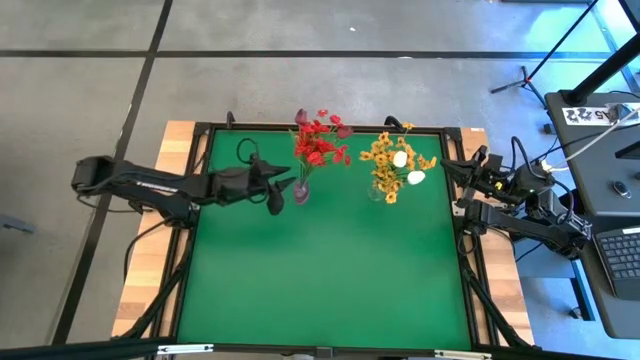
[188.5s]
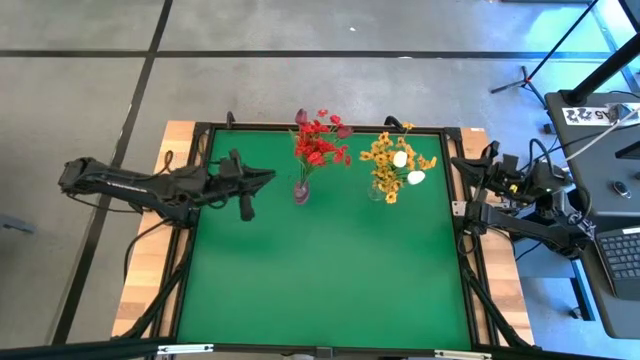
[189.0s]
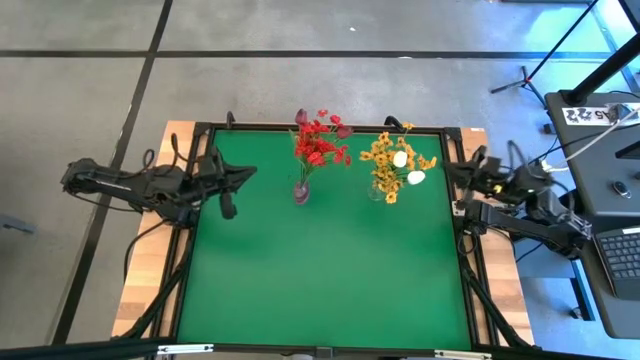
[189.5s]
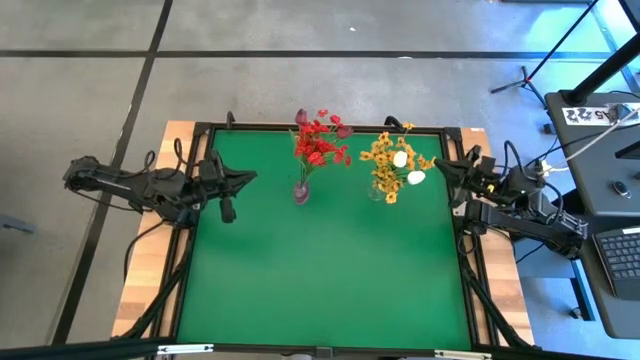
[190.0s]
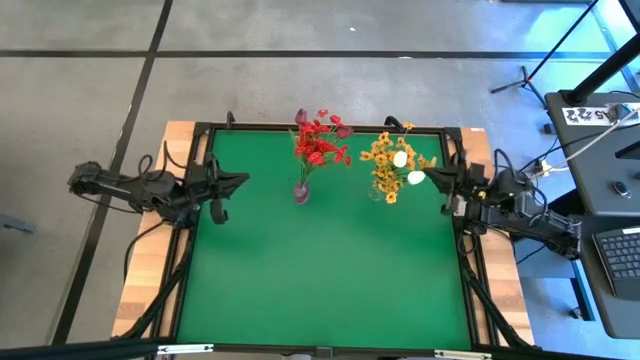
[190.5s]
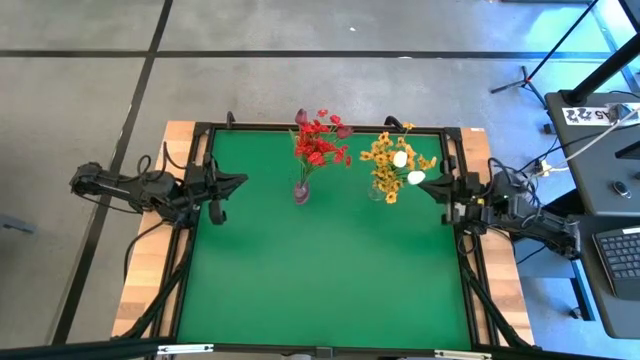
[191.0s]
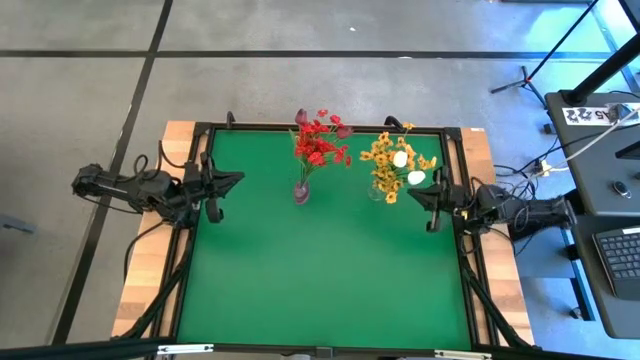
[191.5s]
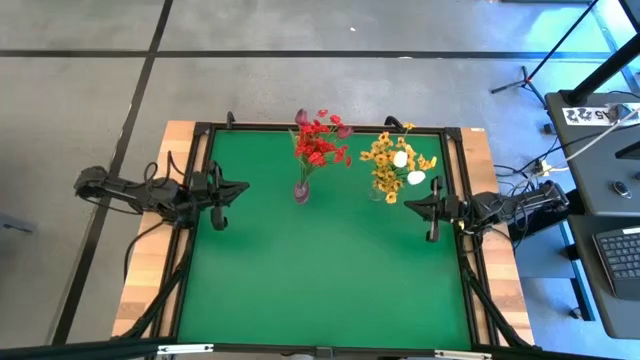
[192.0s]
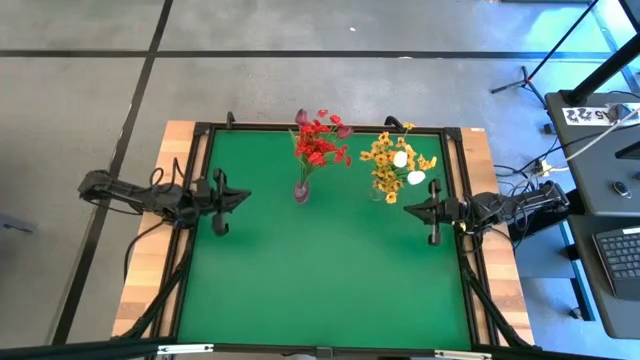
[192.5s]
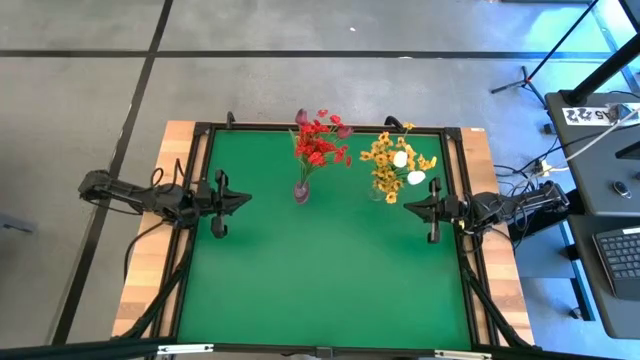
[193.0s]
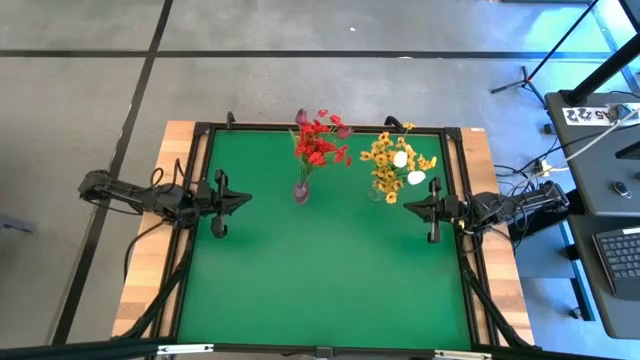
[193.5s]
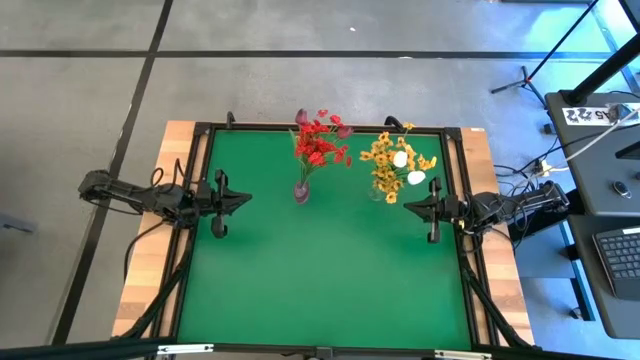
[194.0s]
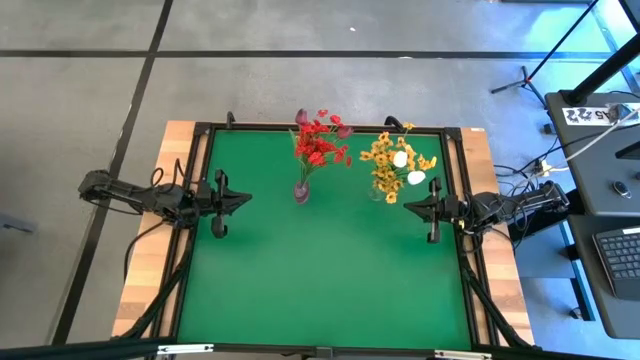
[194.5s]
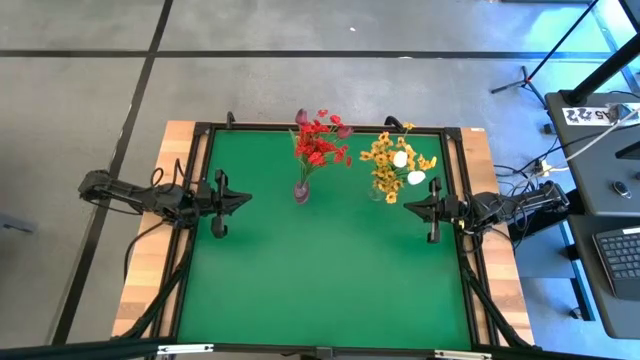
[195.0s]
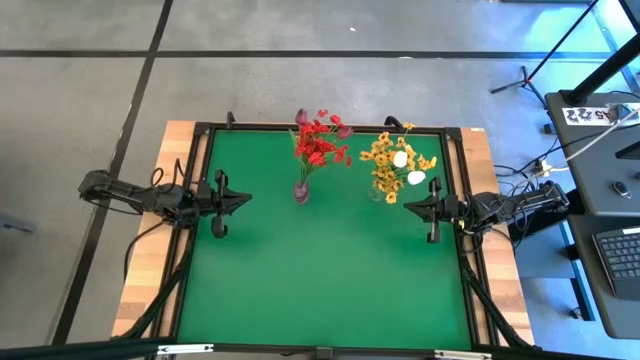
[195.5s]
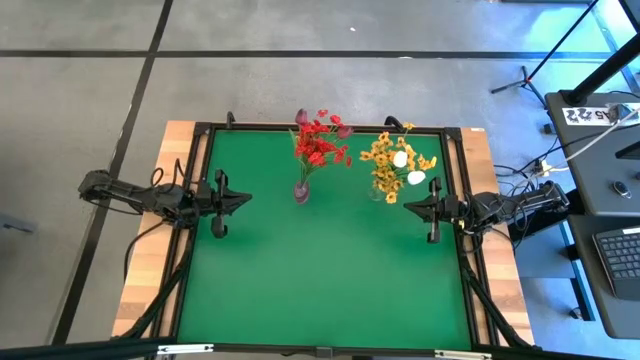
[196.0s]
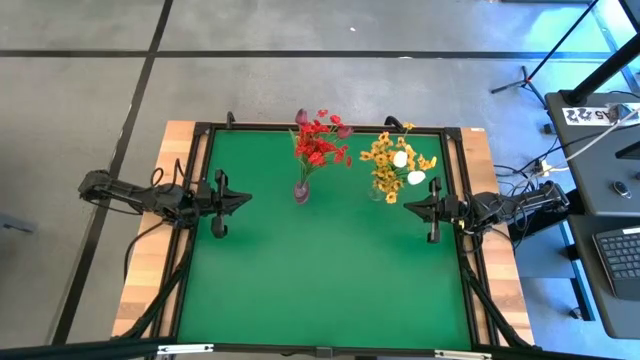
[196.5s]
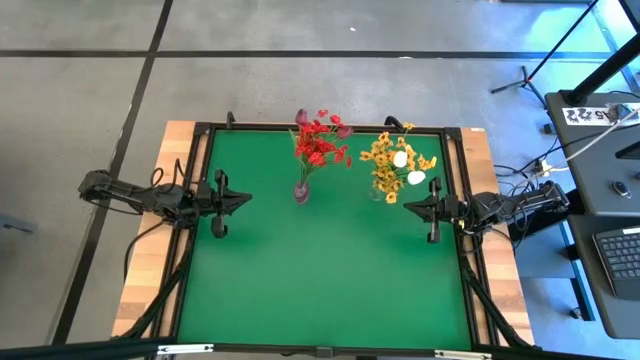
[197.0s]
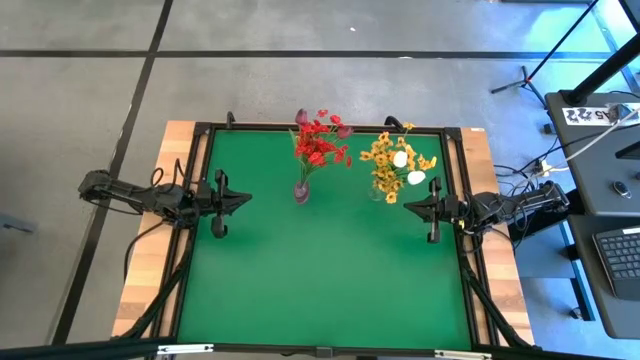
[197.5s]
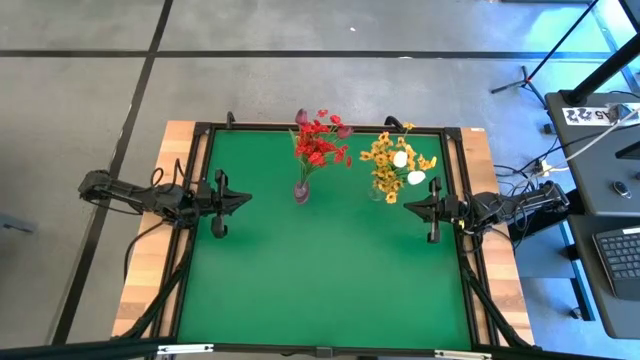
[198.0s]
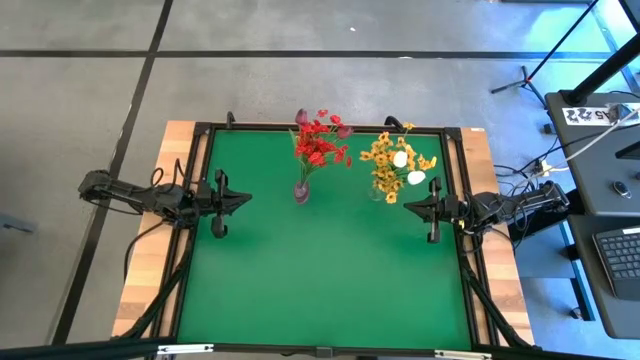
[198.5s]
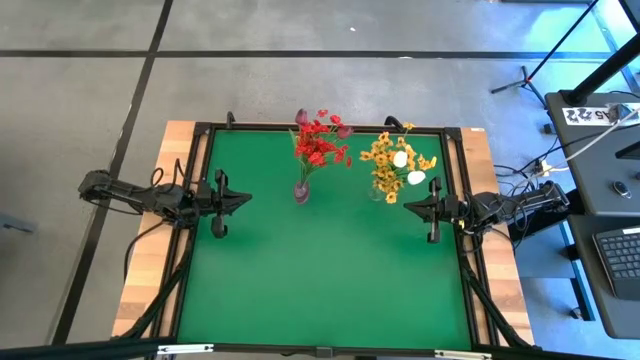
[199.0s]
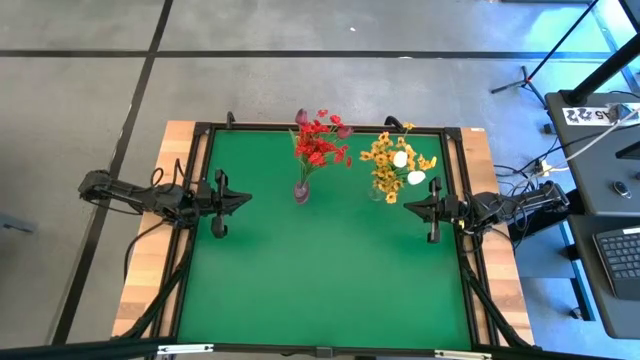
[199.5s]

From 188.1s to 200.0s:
Task: Sort flowers into vase by color
Return to Home Position

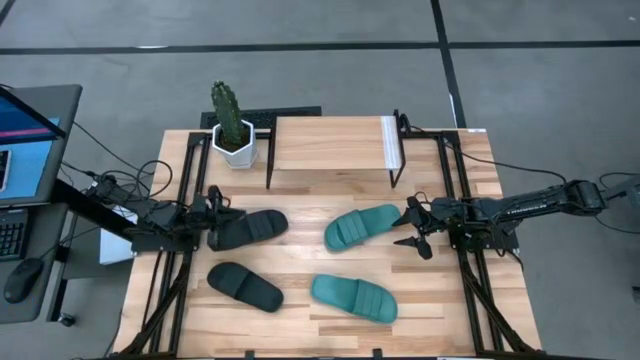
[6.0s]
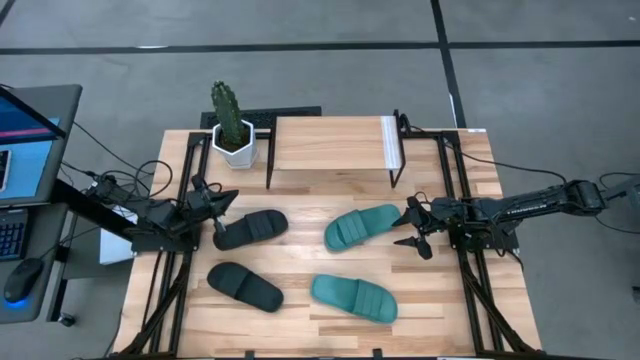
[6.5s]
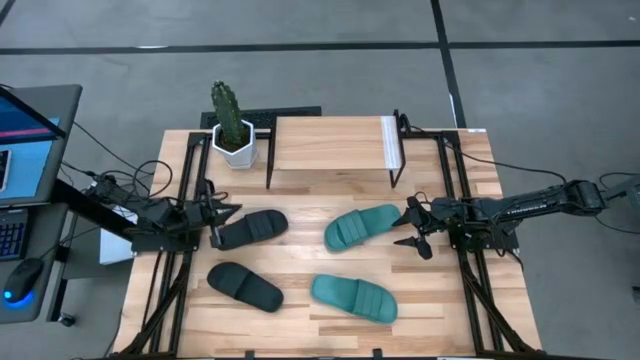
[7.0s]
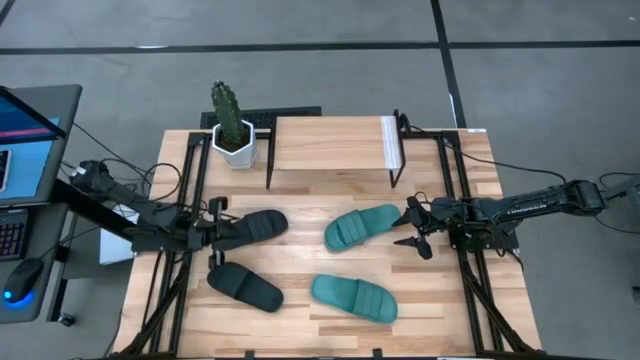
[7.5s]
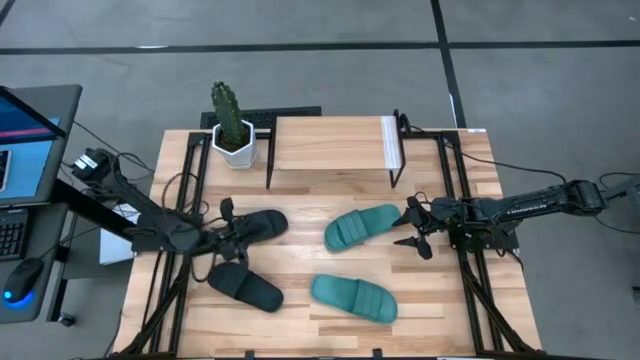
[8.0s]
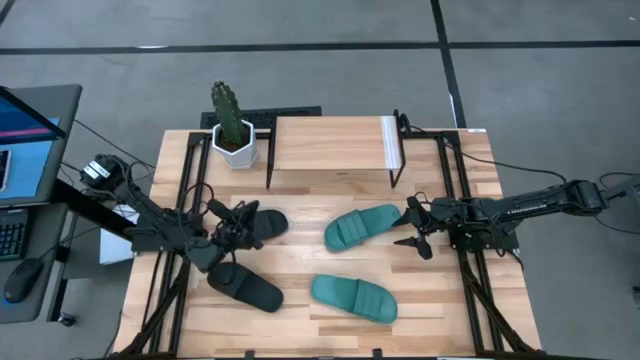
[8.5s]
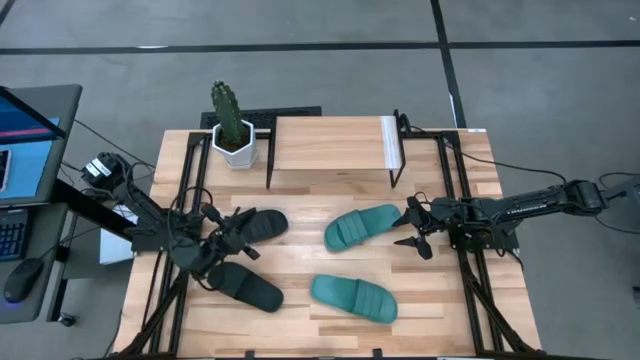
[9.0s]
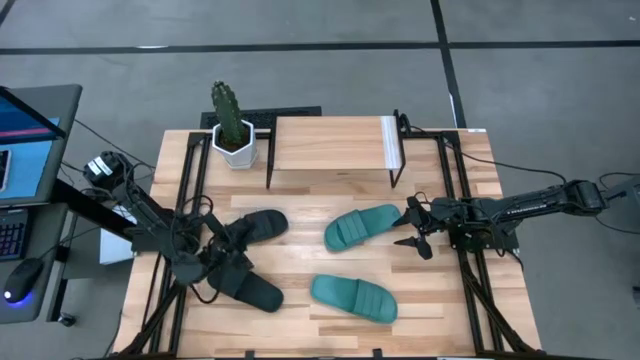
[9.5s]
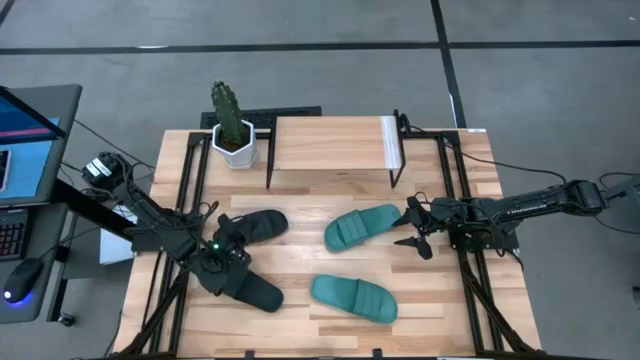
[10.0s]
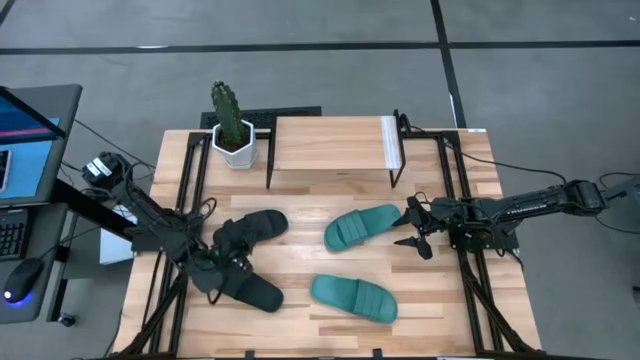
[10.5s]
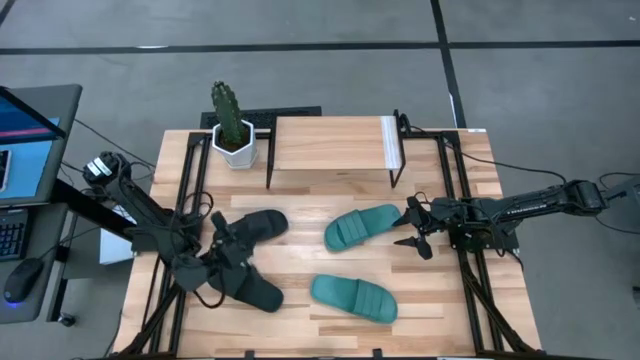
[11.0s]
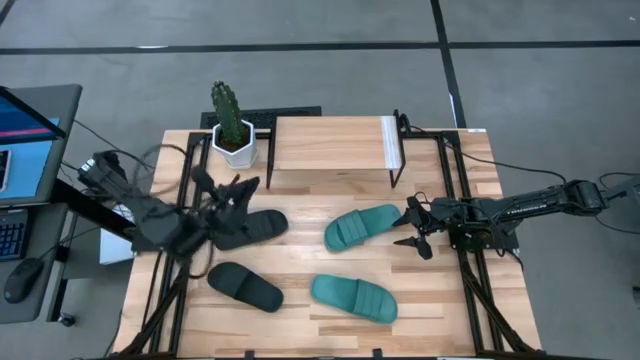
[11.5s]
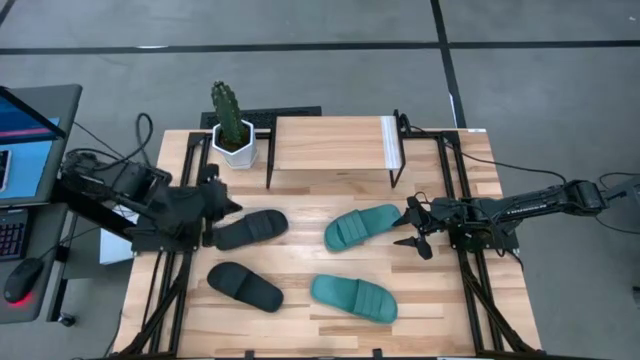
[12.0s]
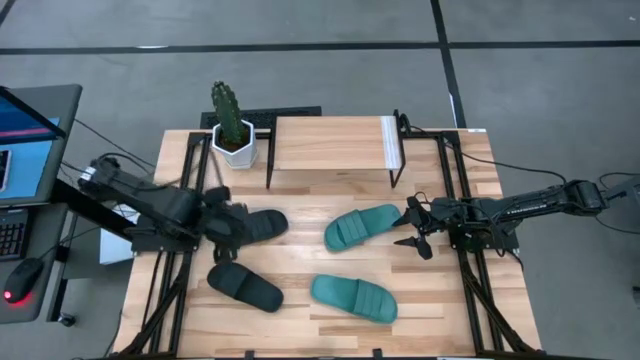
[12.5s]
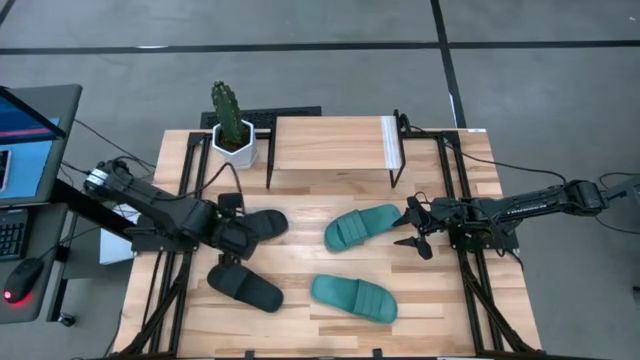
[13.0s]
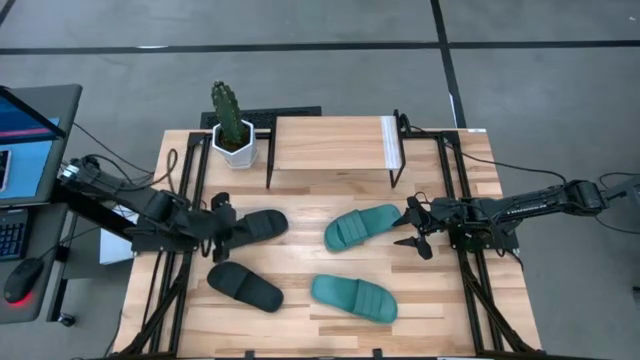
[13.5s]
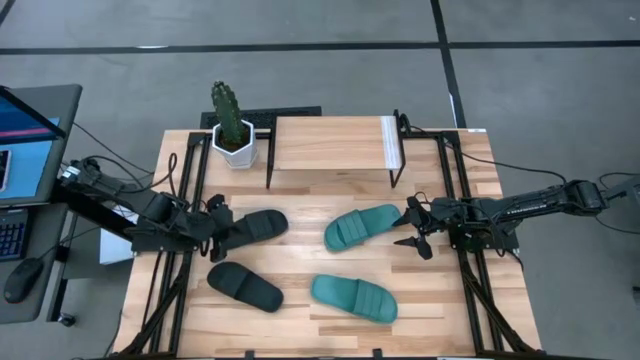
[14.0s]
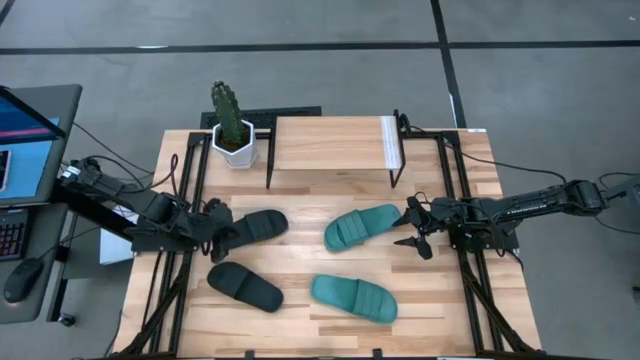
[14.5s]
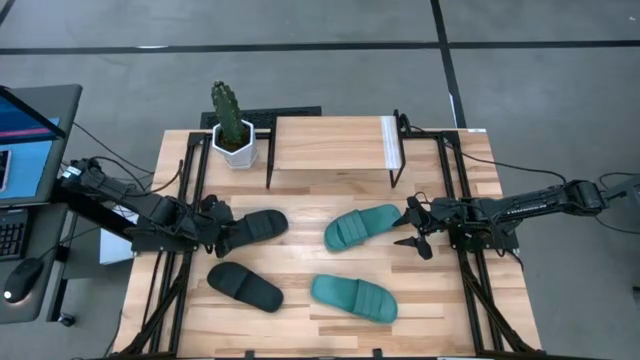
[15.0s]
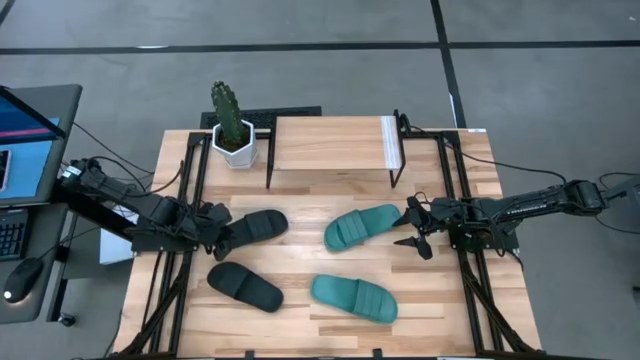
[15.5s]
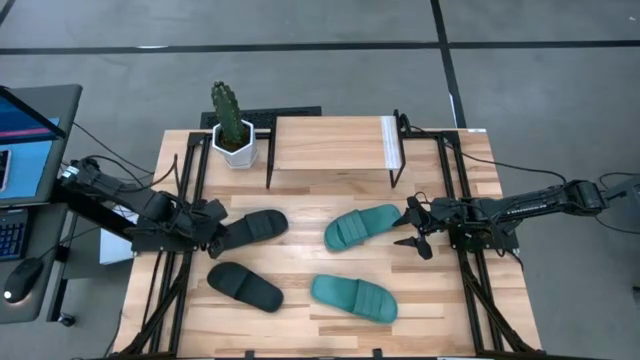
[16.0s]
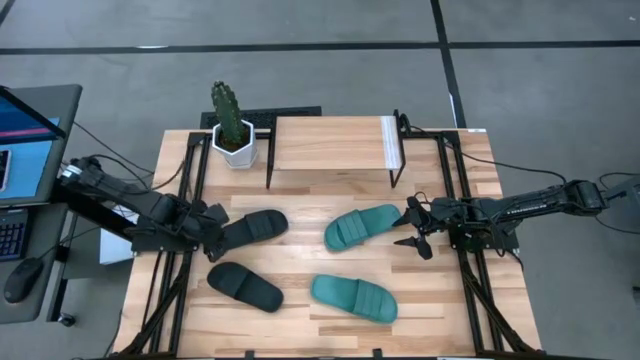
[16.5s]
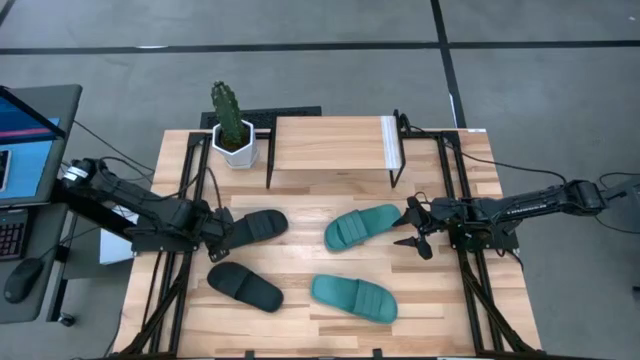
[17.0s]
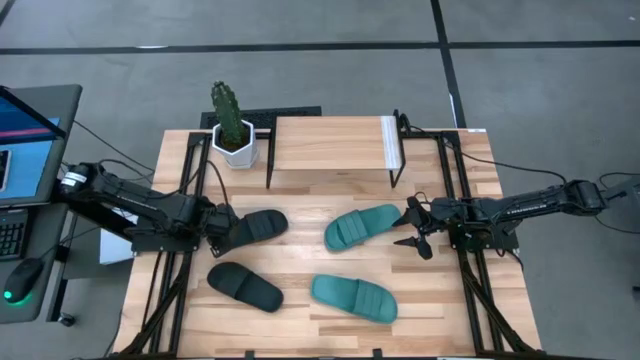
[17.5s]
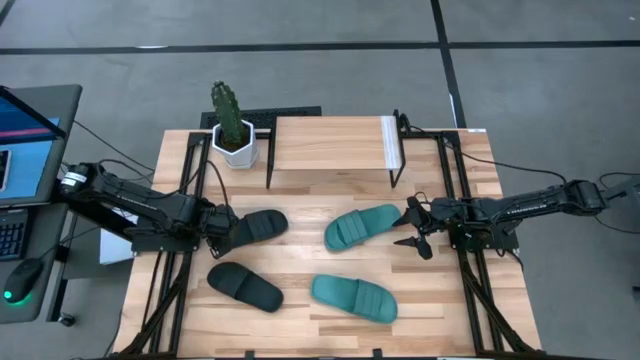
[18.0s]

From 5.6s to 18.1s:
Task: Pick and place slides into the shelf
Put the top black slide on the shelf
